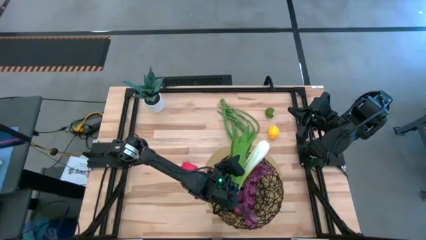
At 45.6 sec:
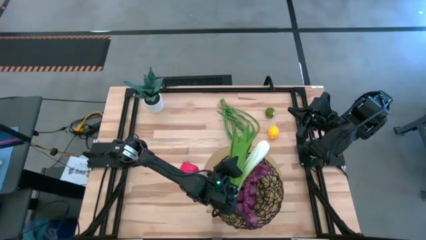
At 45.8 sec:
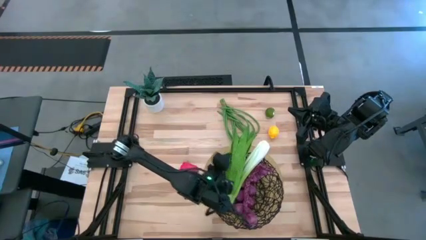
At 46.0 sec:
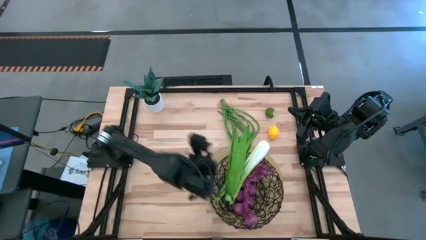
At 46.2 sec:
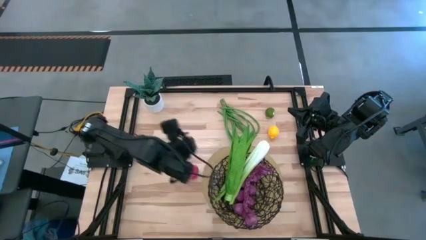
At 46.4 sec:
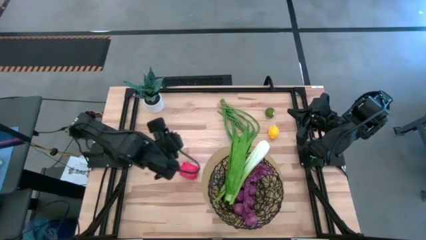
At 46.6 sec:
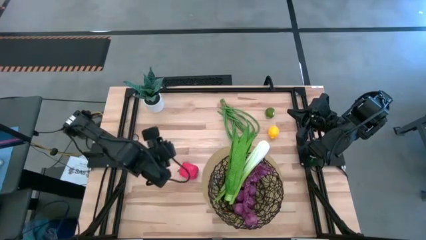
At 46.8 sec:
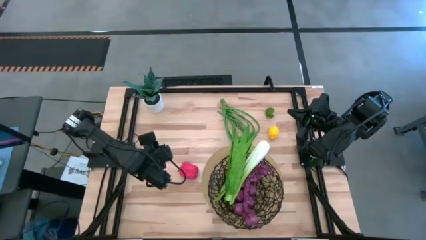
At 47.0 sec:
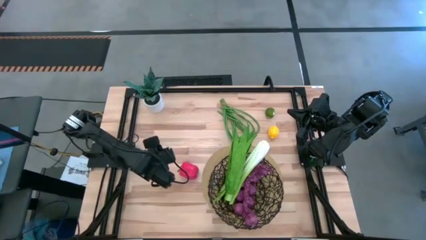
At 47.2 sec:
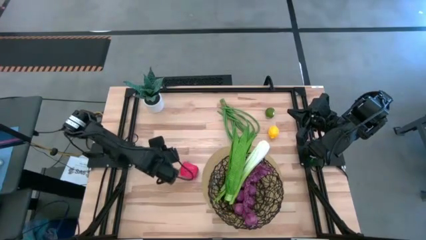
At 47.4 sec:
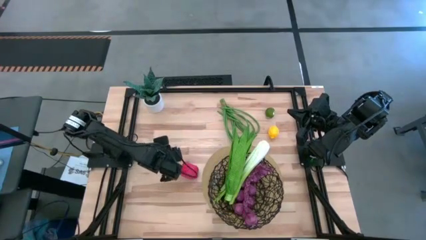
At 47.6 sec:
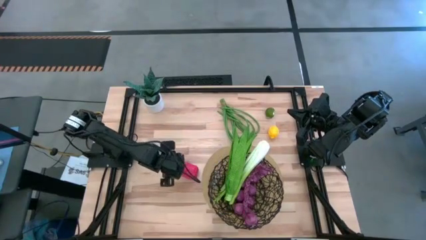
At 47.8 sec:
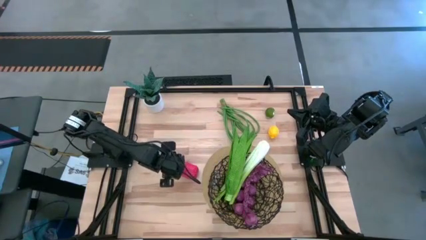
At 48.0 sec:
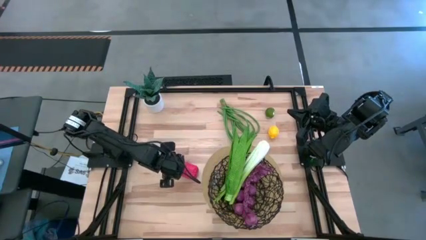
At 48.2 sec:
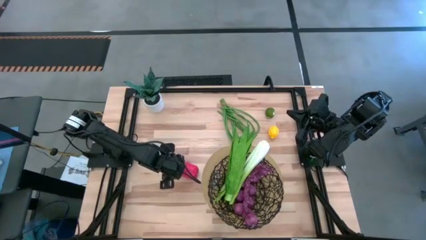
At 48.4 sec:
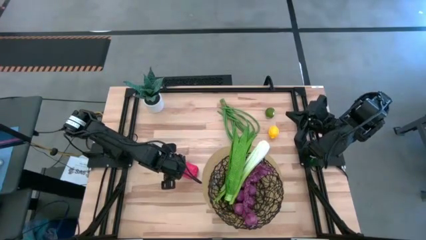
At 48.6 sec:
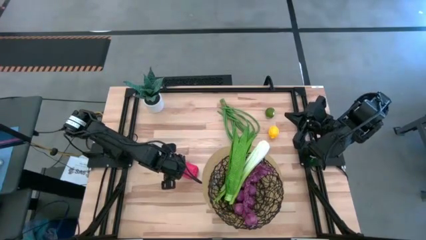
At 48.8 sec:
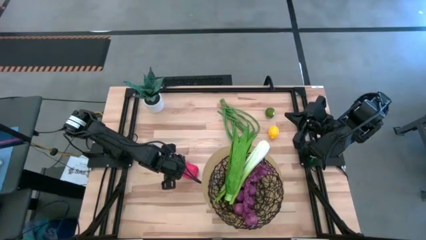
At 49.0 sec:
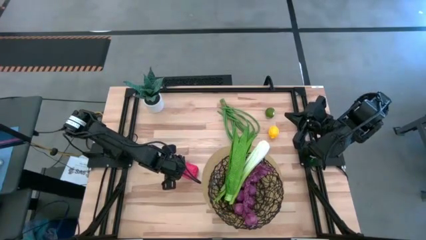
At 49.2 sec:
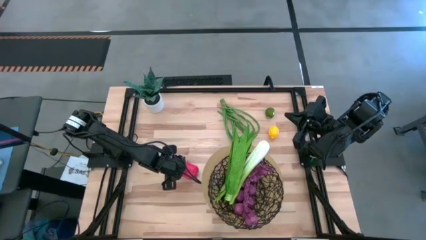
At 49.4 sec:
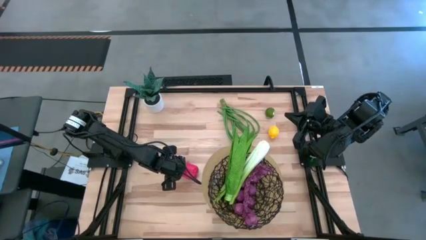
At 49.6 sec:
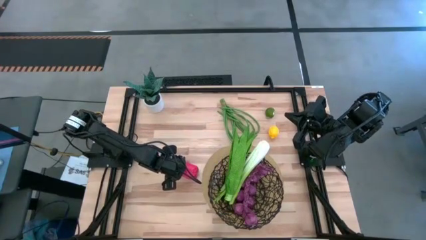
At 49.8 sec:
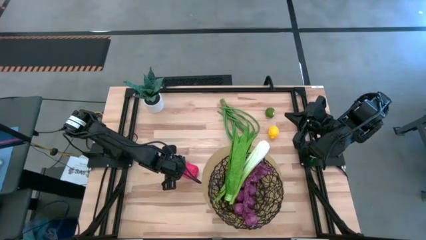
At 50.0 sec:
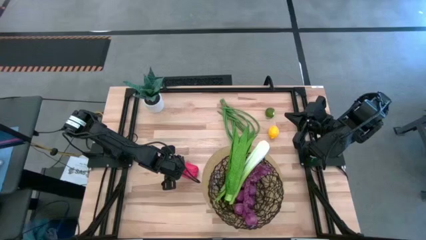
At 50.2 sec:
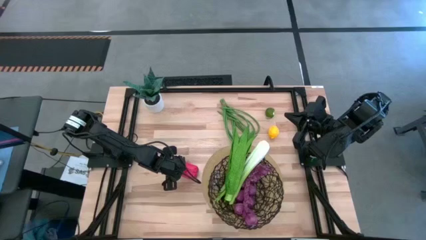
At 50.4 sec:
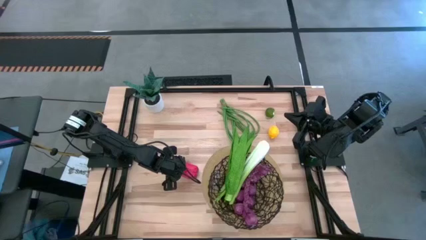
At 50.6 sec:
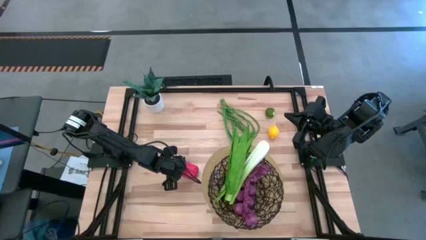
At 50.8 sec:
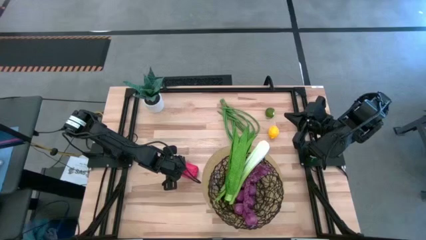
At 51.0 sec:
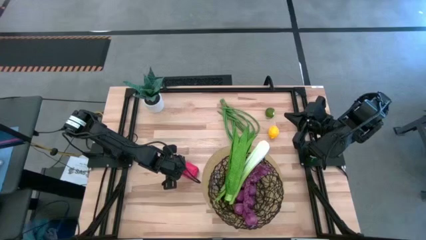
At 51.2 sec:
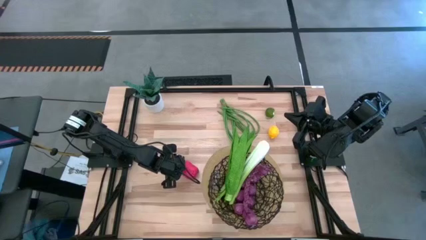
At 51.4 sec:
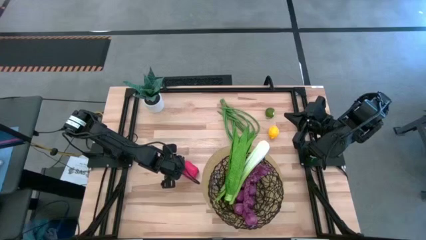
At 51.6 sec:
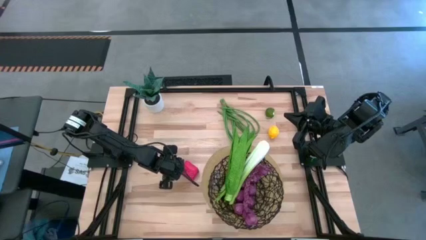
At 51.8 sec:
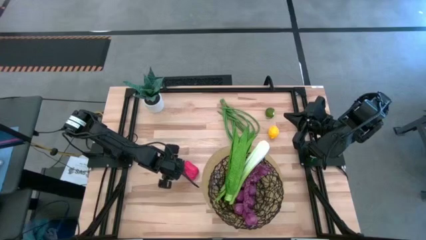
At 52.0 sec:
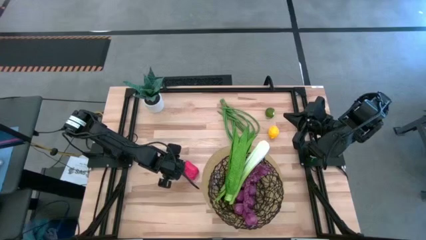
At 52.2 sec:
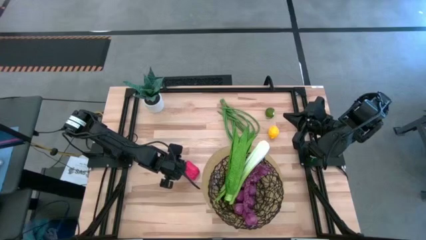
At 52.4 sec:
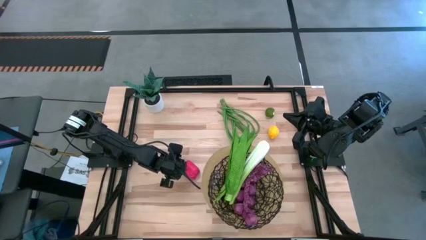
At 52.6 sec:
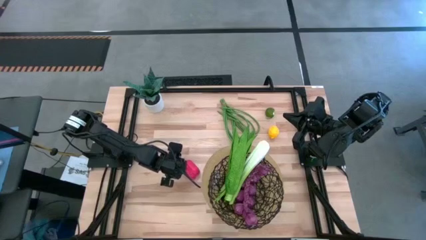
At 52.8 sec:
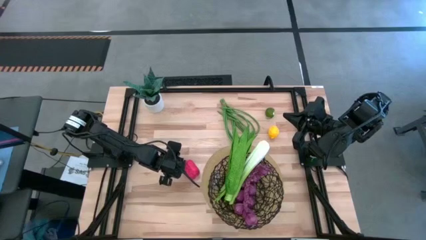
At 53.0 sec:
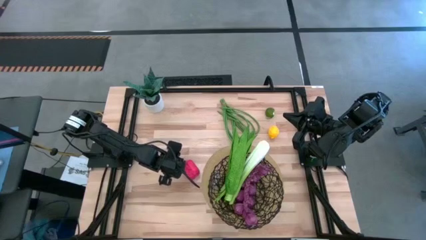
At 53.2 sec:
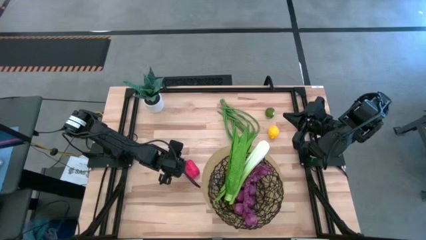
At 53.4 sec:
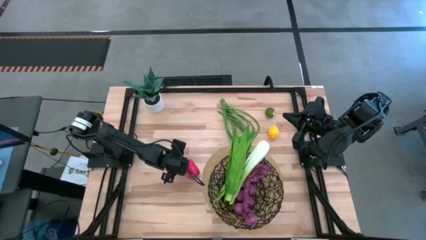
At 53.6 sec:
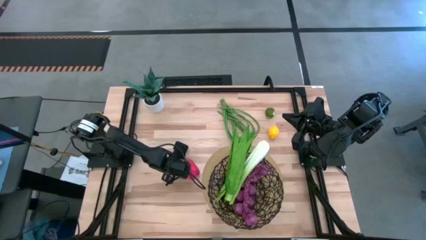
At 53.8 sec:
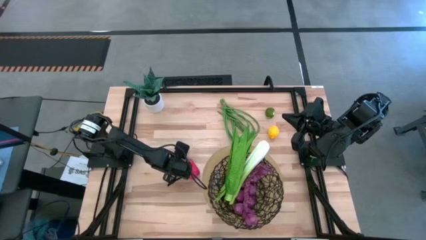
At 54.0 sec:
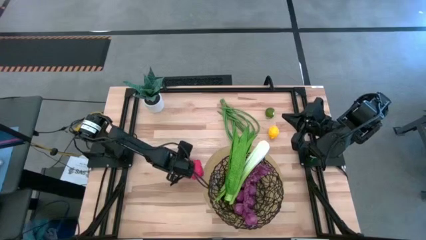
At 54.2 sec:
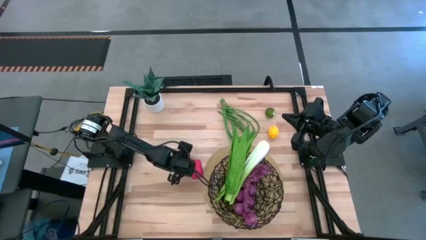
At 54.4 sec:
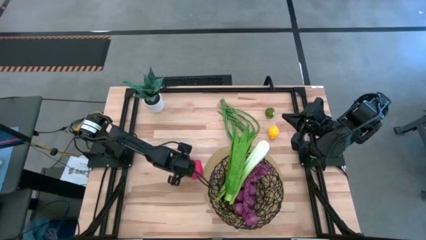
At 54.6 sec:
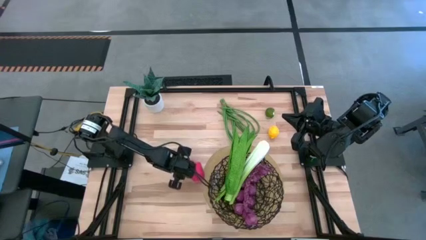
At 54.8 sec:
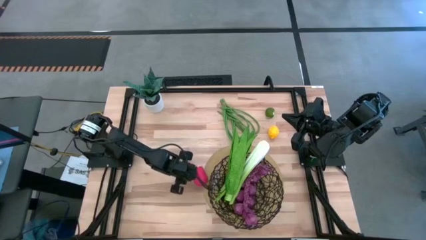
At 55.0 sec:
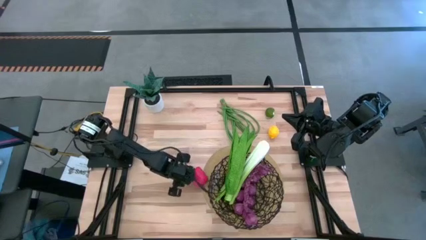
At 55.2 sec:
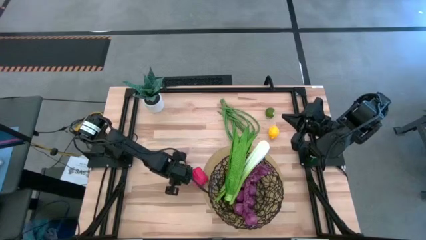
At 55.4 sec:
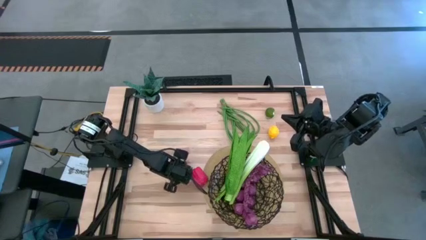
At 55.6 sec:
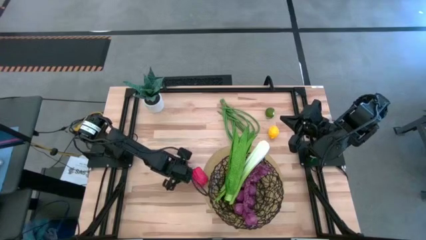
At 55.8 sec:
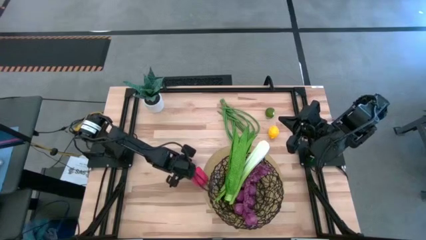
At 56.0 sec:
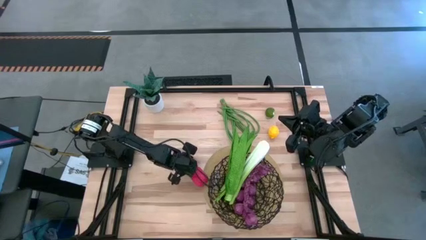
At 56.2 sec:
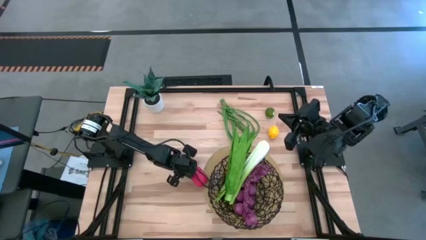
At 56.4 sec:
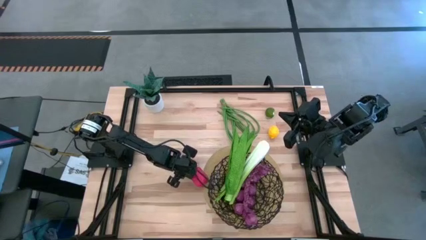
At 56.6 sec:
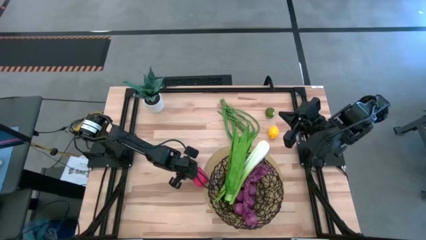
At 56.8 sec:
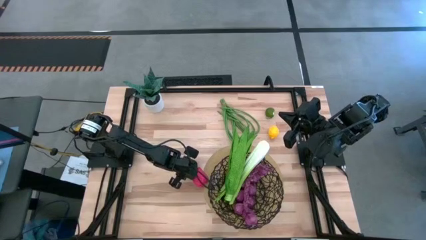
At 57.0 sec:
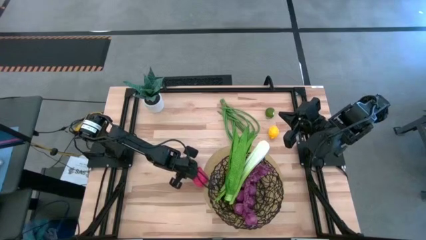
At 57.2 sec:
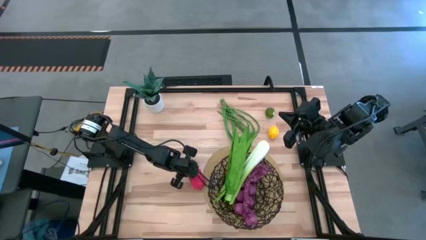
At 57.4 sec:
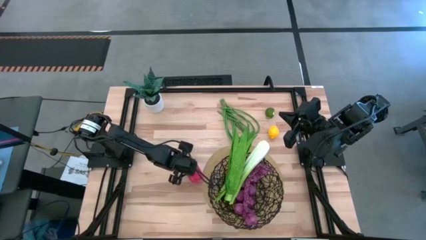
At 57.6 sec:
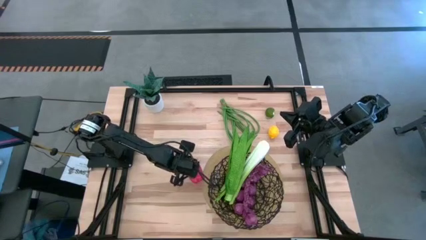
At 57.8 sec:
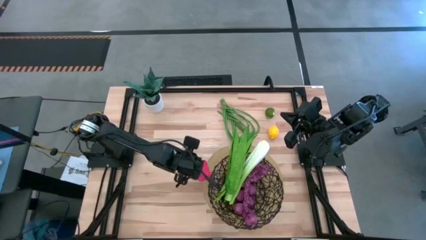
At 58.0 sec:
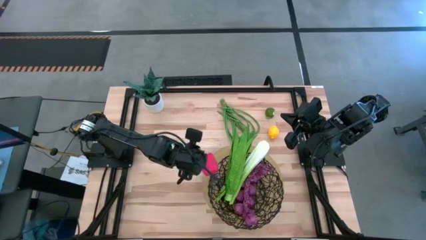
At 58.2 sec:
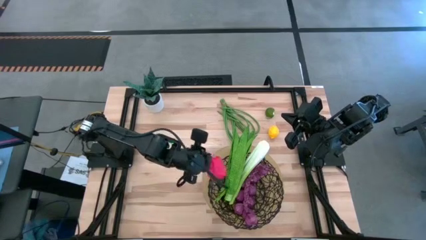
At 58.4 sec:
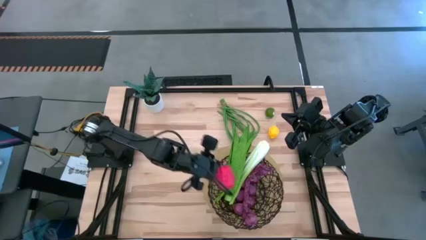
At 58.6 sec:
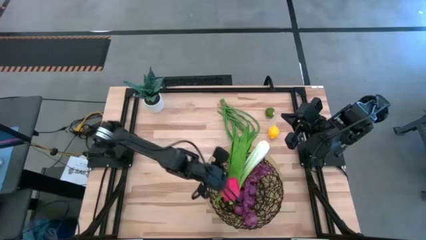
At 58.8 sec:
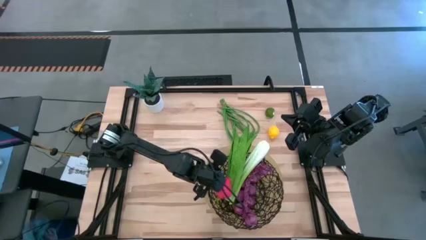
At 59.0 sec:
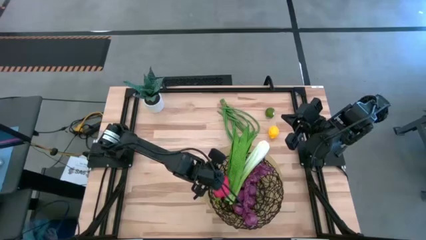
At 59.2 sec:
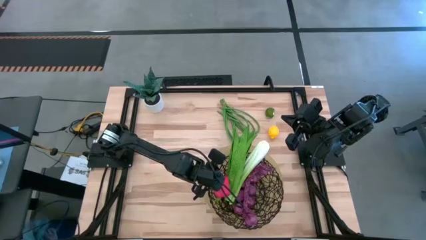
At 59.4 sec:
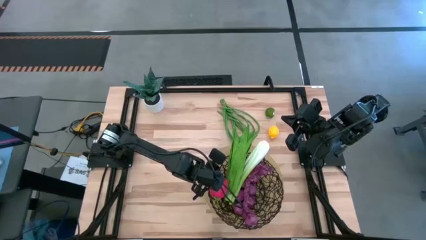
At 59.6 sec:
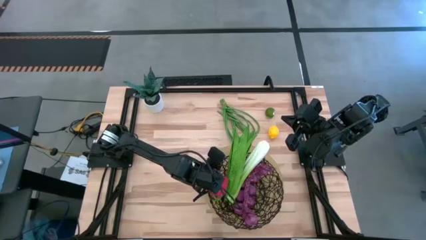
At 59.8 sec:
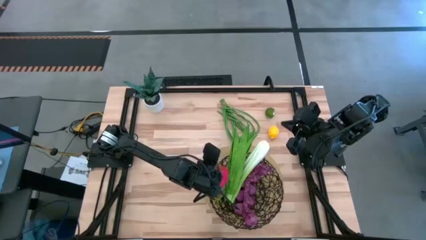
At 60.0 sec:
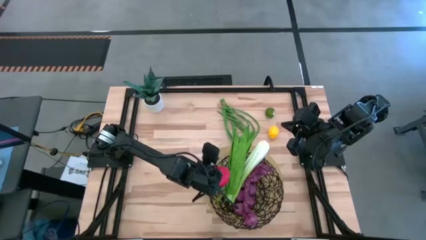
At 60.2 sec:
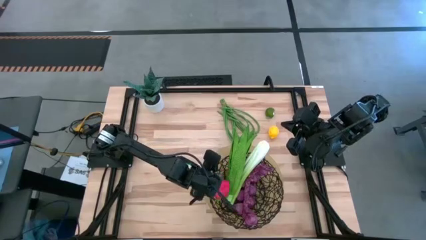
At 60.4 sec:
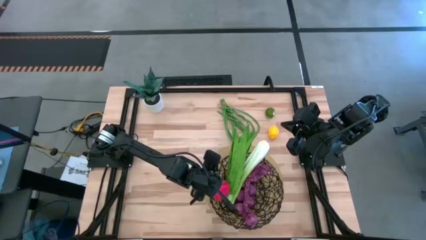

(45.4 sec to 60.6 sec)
Task: Build produce basket
Put the red bell pepper into the black basket

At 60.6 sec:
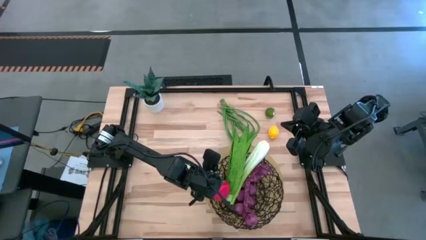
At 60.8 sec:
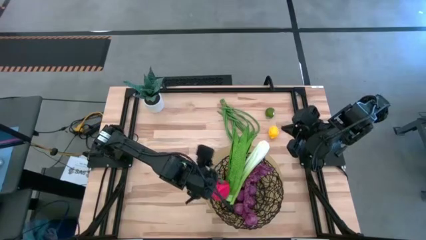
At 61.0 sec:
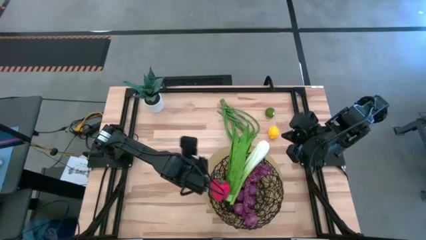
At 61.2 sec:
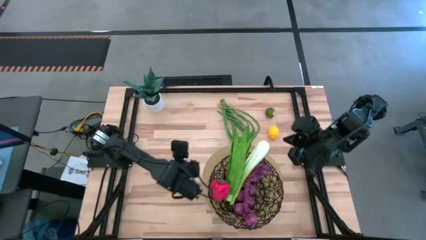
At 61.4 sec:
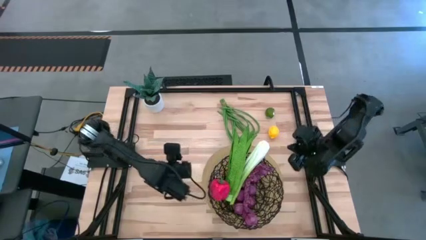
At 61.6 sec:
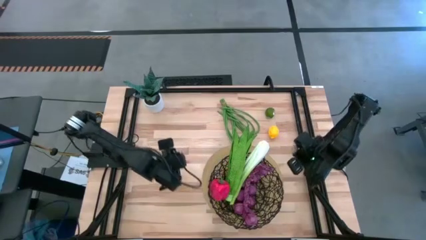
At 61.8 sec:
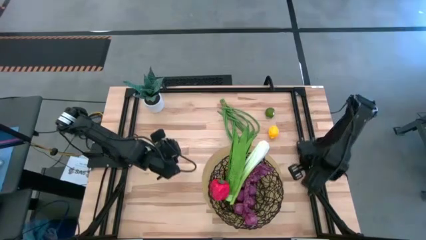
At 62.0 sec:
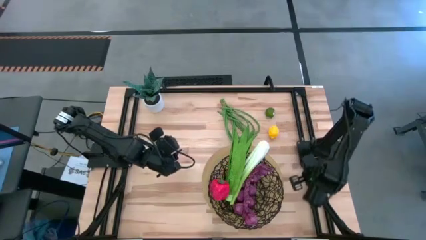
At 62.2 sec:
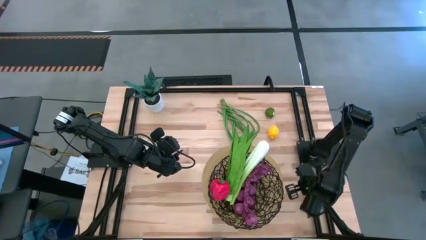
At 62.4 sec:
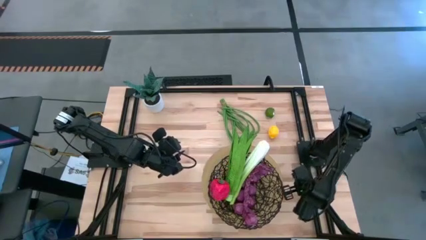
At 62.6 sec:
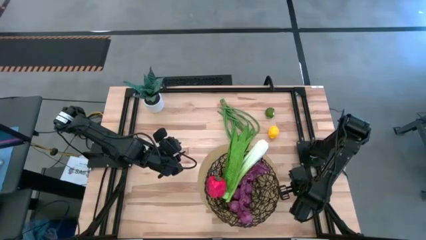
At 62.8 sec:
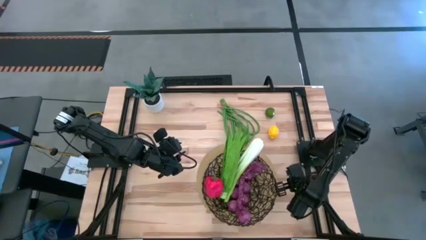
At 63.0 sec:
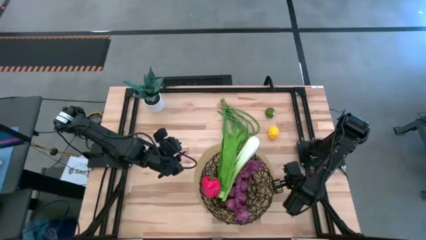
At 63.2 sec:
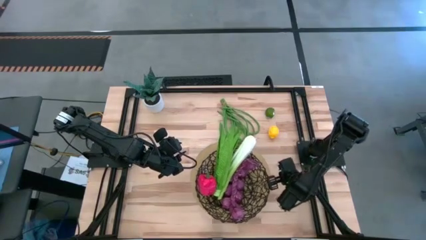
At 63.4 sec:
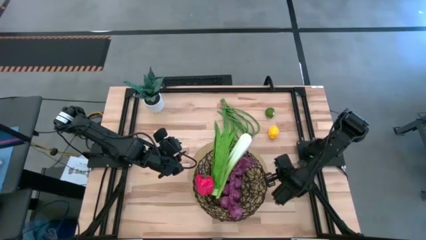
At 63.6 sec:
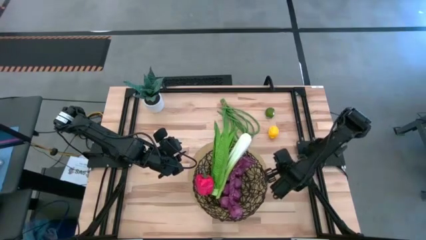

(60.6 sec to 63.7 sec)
Adjust the black basket
